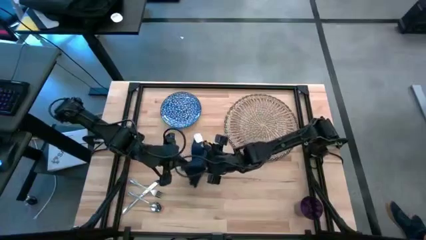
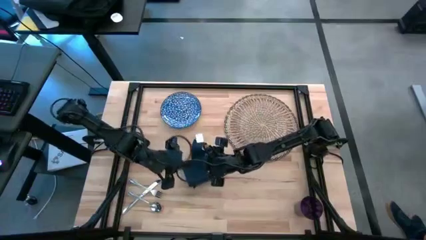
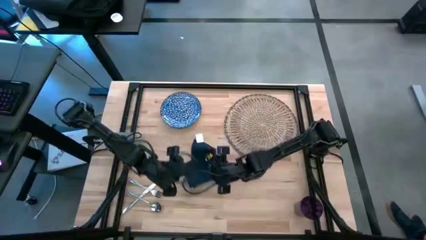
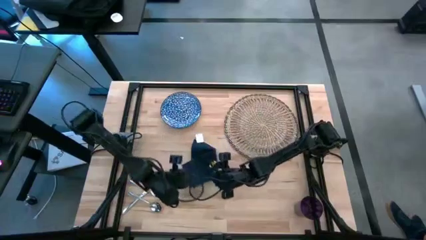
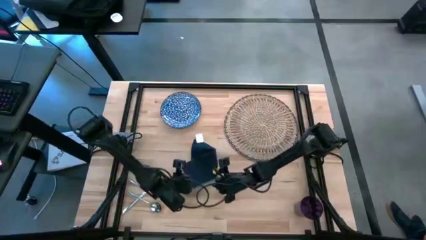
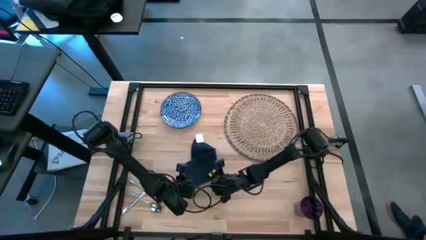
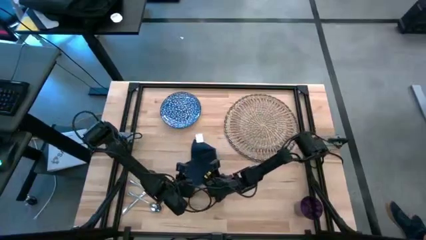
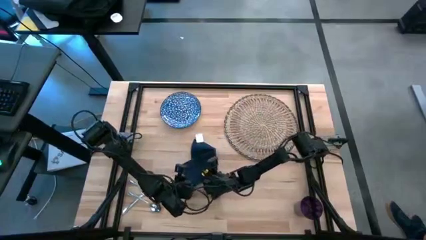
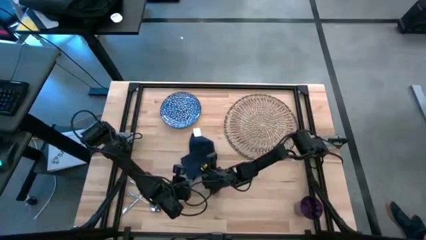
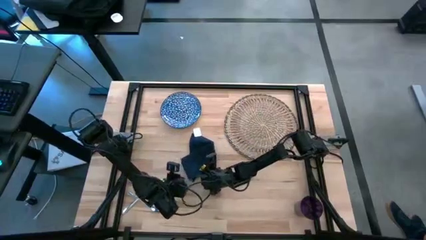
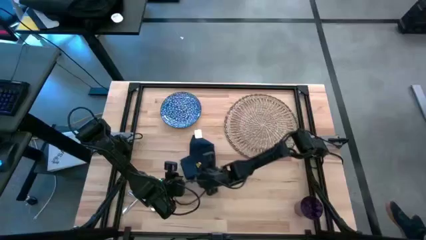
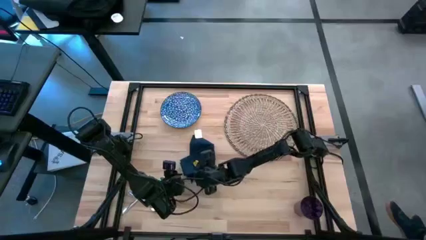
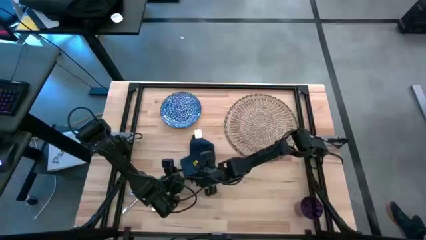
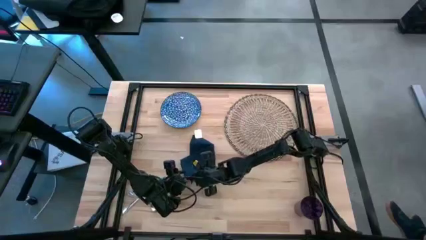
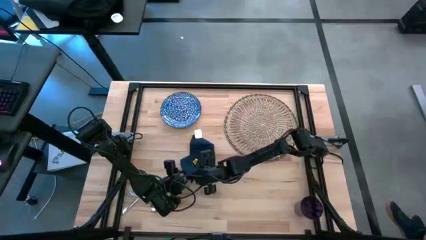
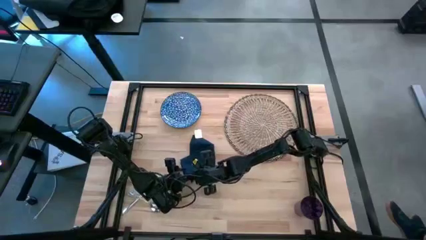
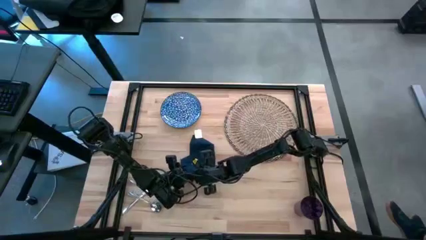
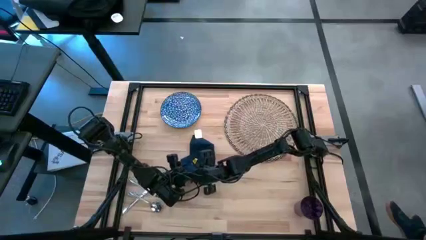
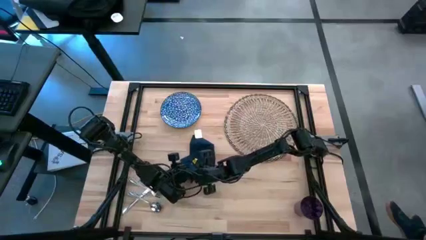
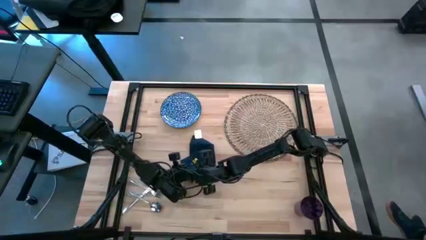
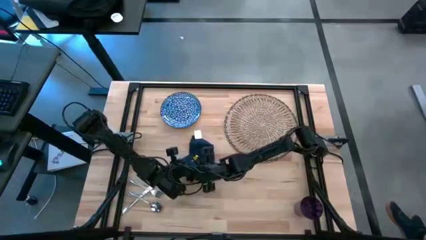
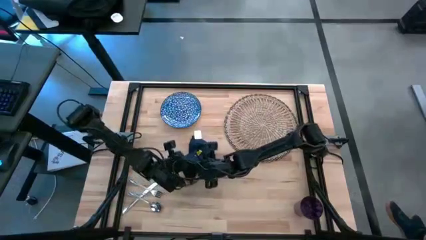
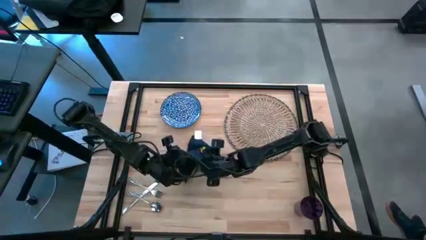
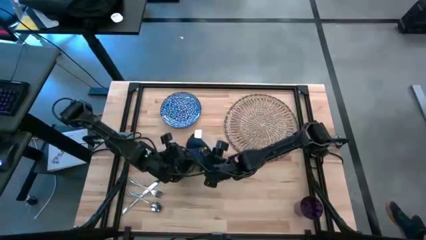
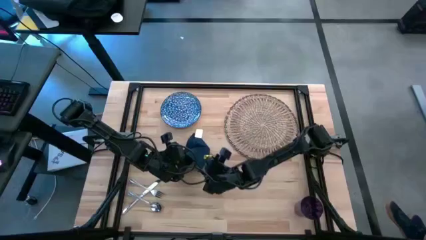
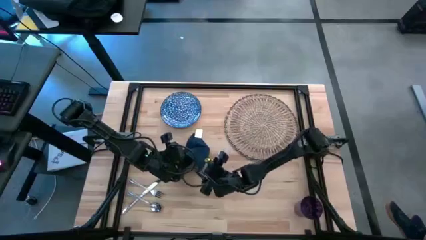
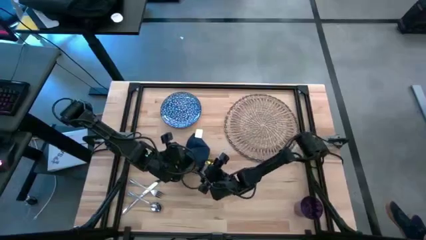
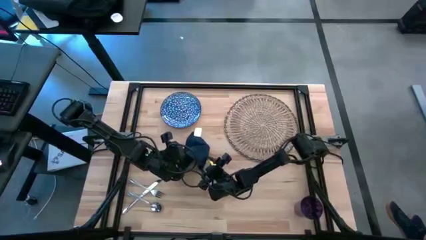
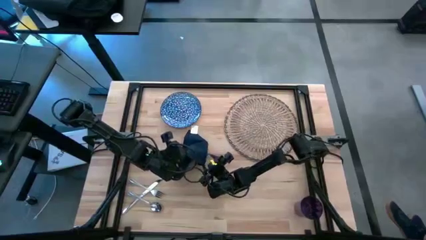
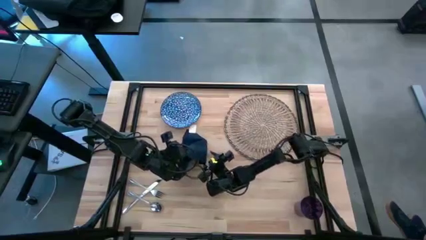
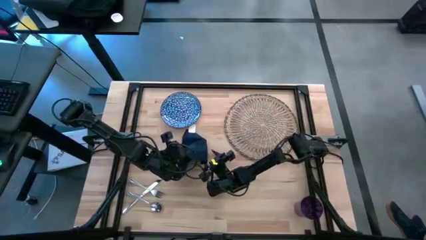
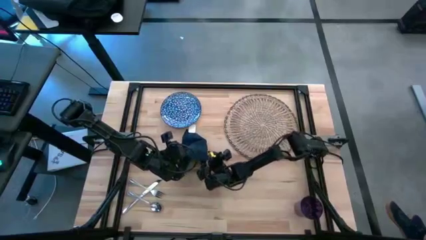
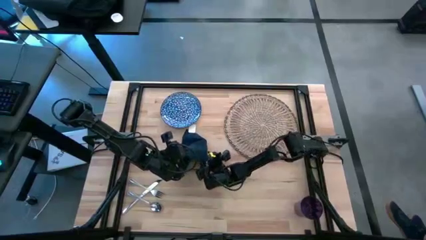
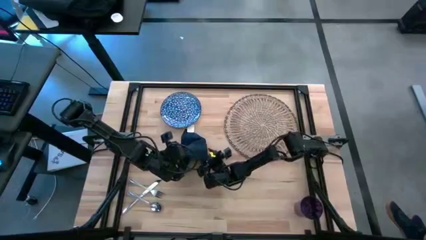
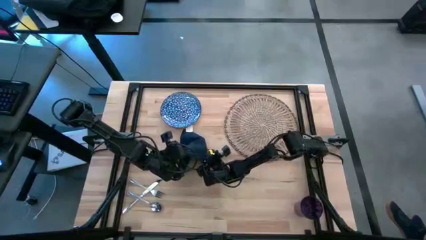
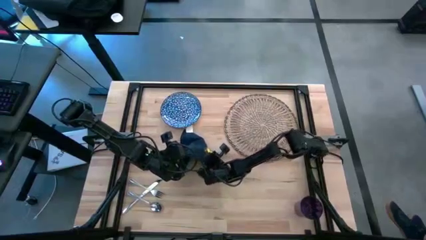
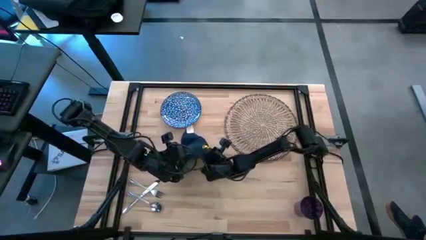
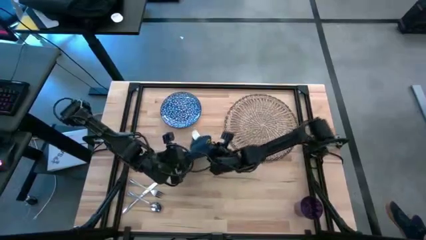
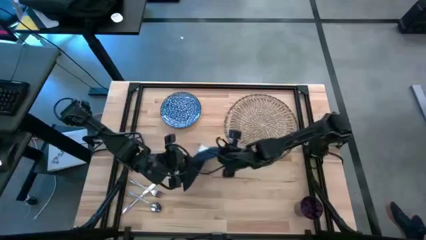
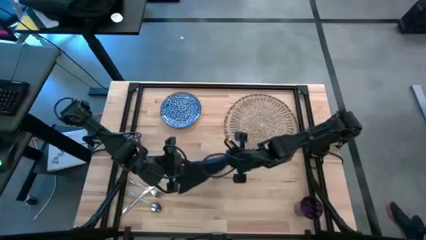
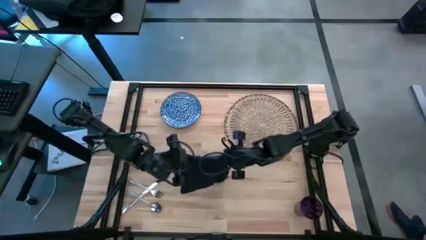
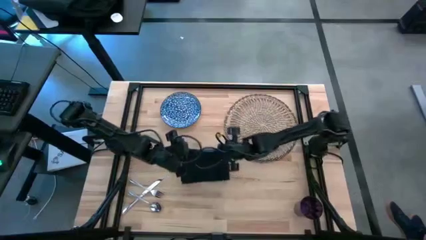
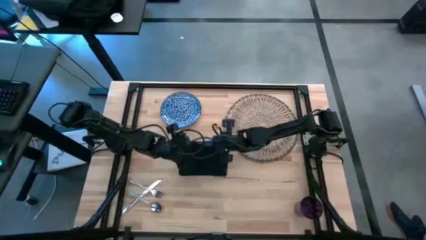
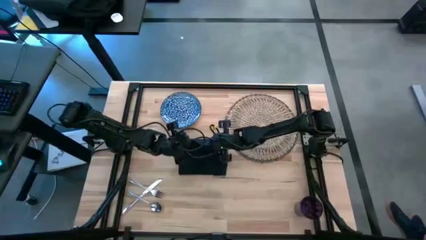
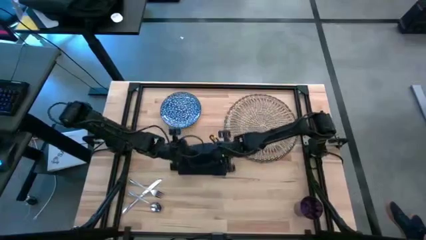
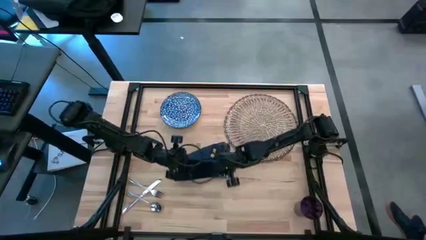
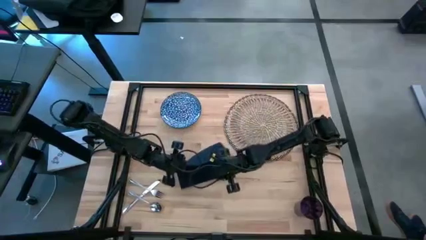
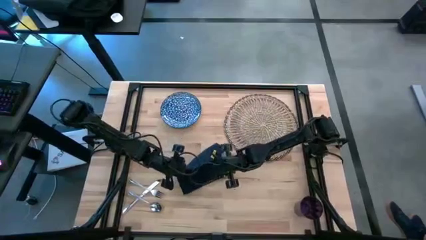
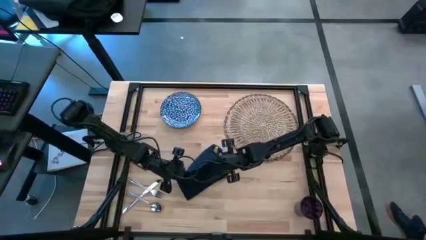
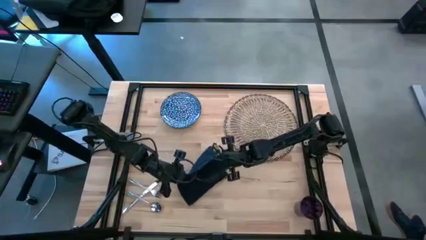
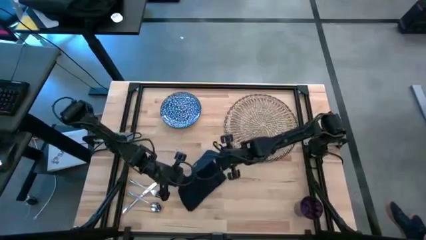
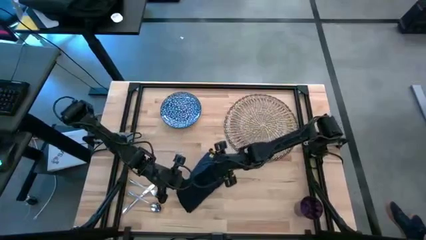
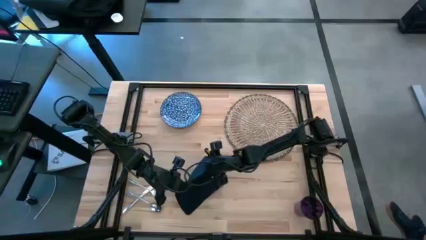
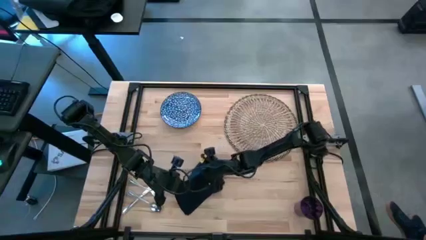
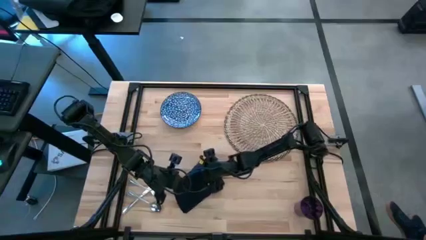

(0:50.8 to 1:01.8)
Task: Set table place
Fold the blue table napkin

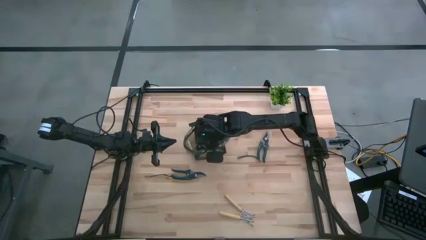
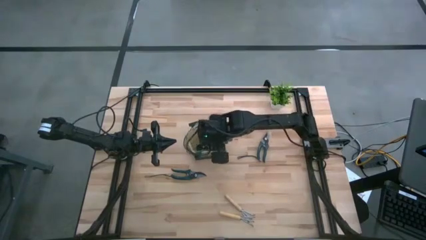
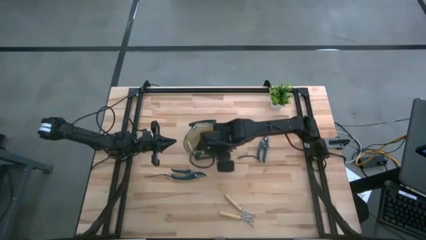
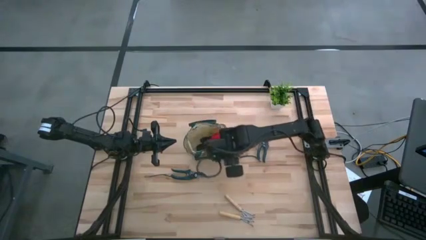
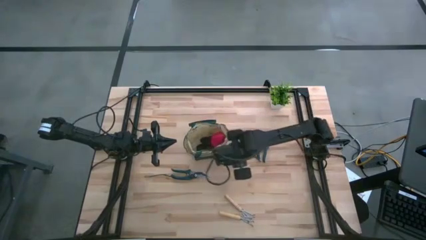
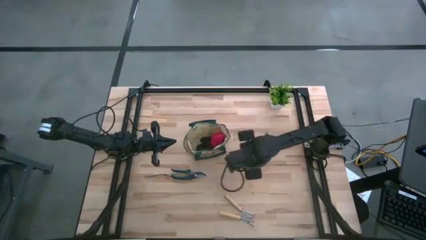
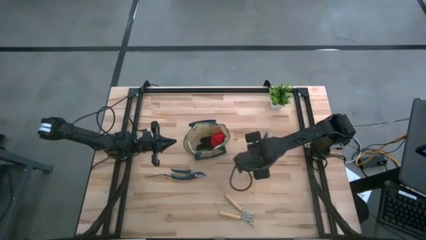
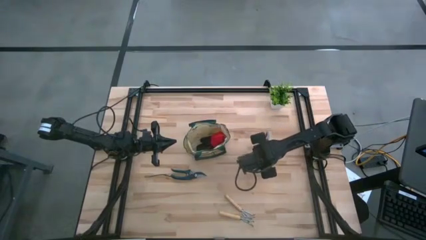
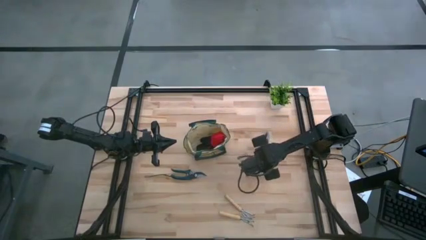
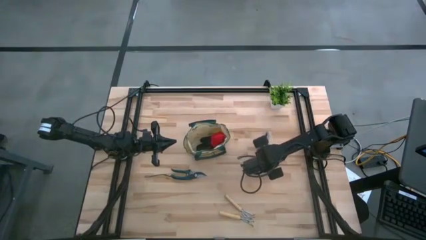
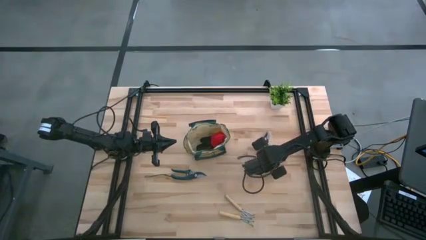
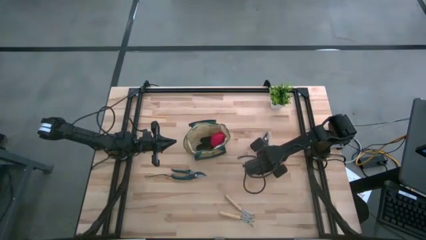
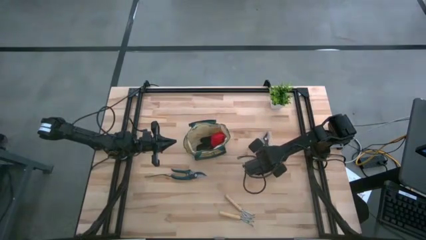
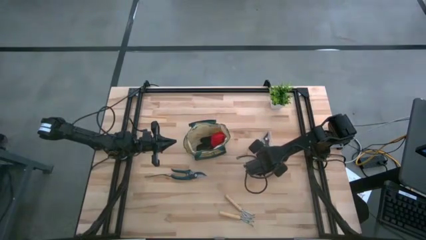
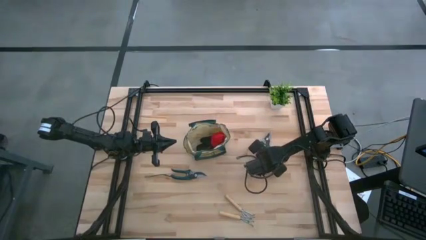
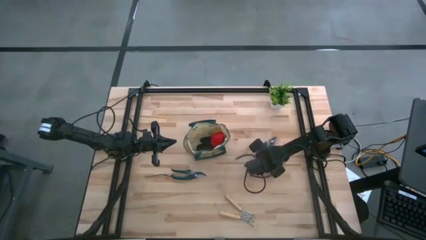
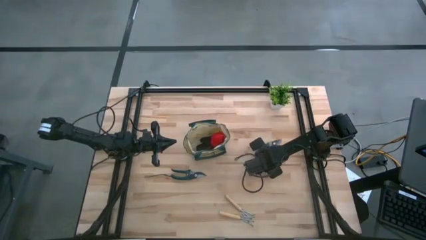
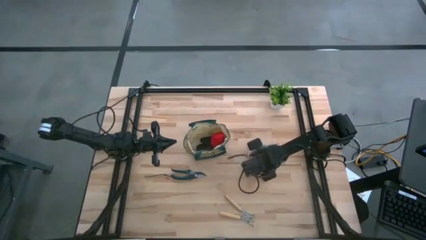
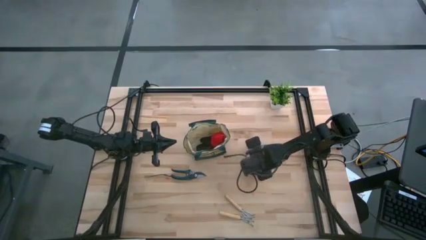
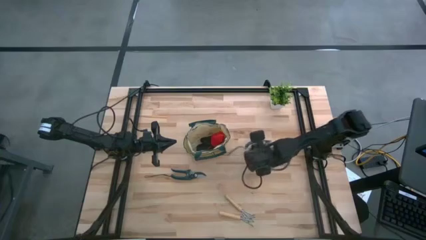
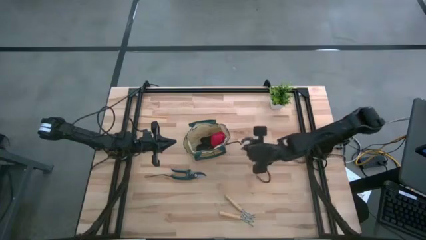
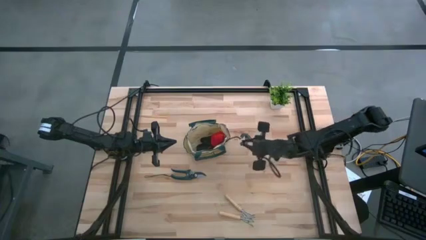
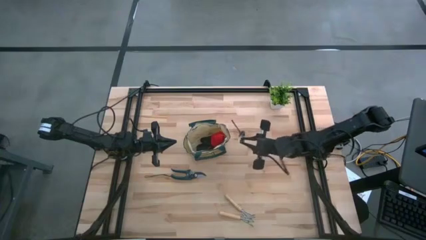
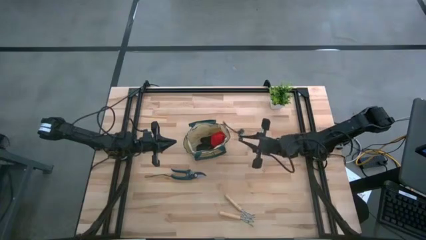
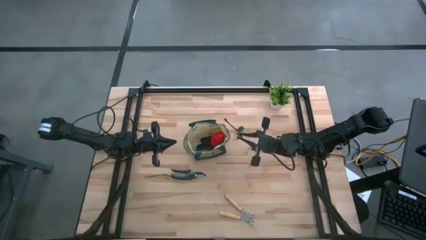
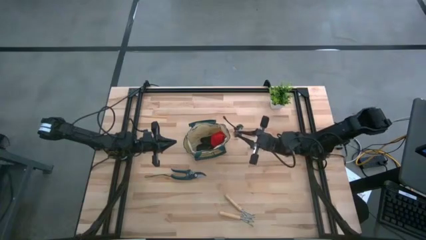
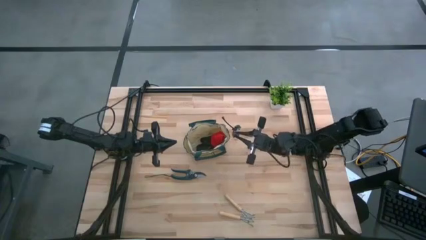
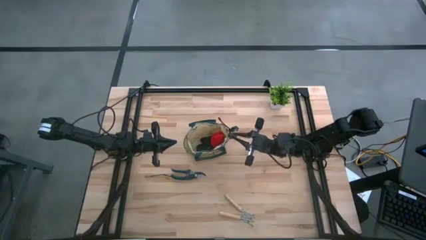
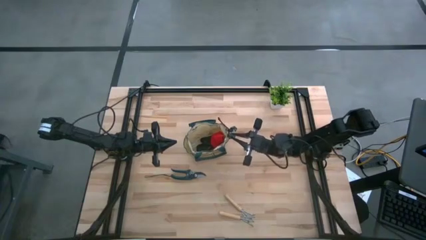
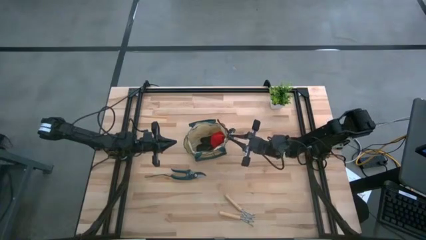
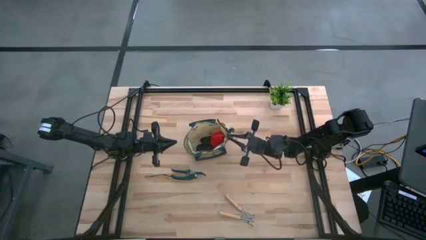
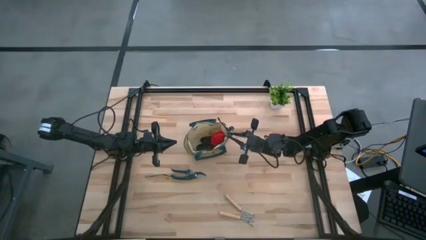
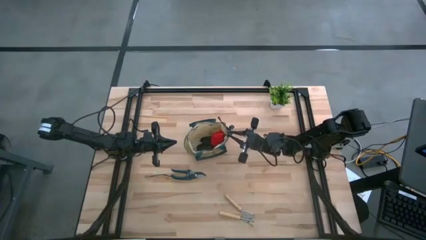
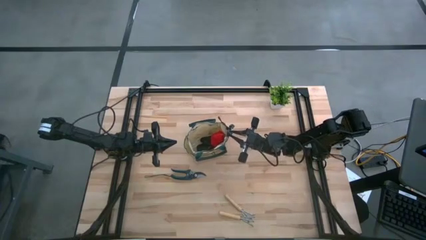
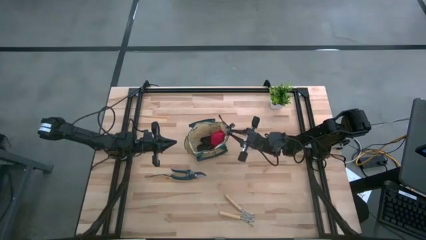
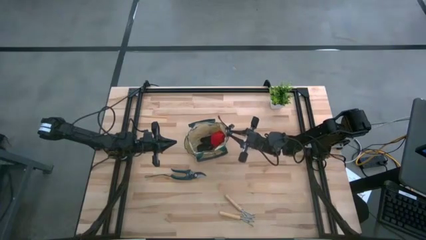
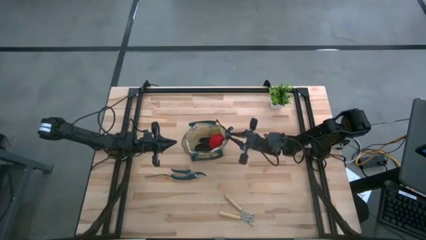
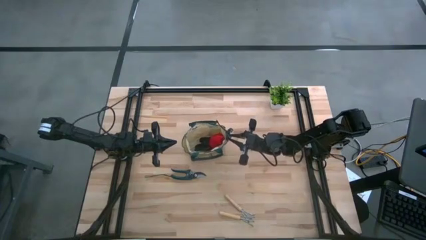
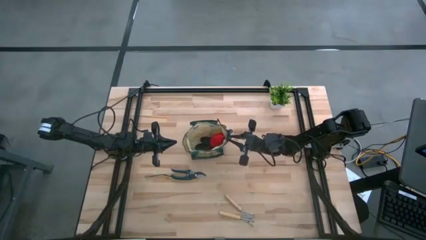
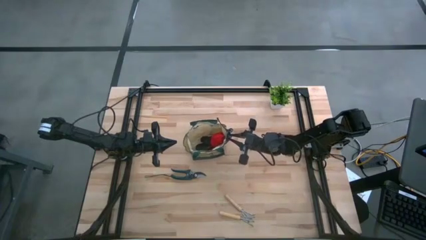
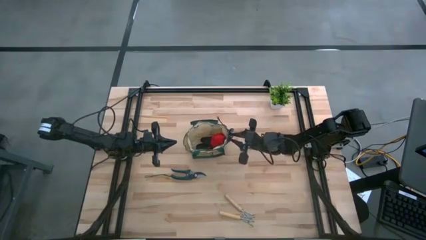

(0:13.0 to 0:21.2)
Task: Pick & Place Garden tools in Gardening bag
Put the right green shear scissors into the brown gardening bag
